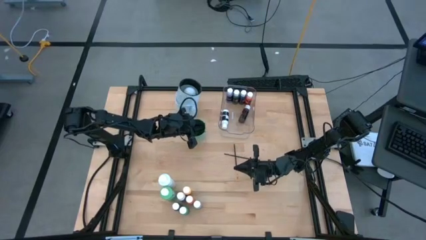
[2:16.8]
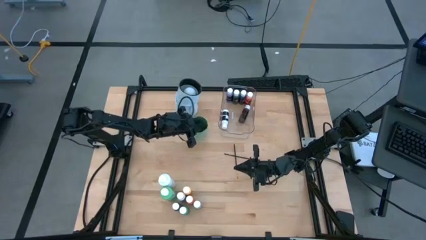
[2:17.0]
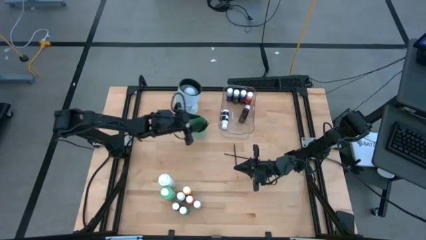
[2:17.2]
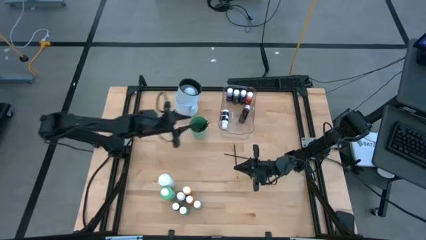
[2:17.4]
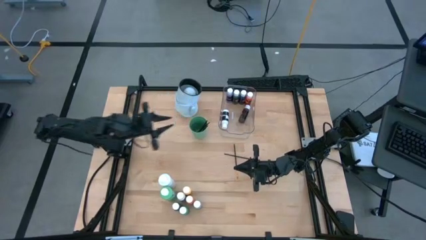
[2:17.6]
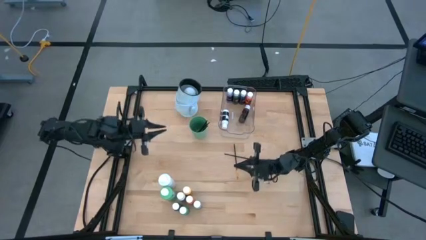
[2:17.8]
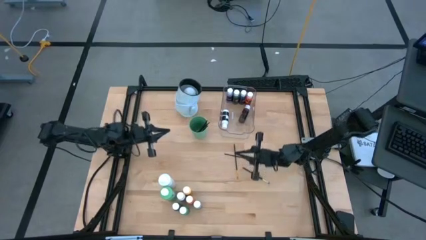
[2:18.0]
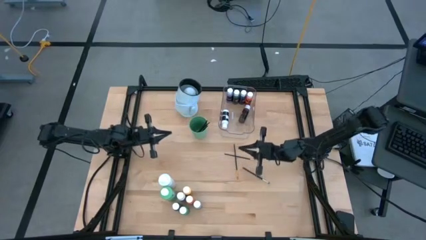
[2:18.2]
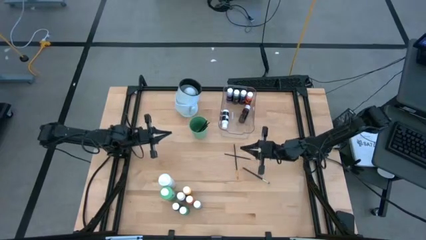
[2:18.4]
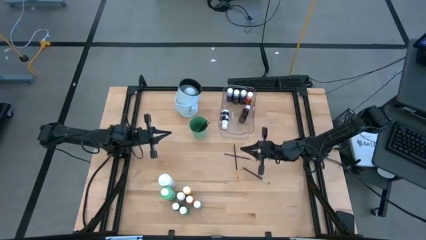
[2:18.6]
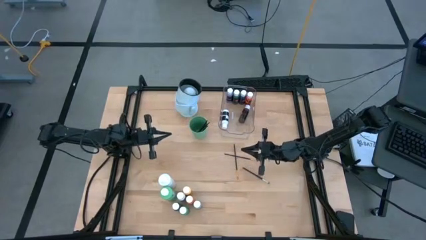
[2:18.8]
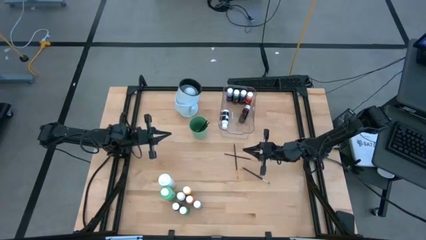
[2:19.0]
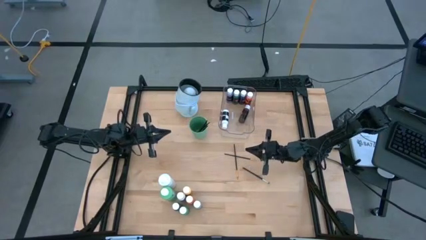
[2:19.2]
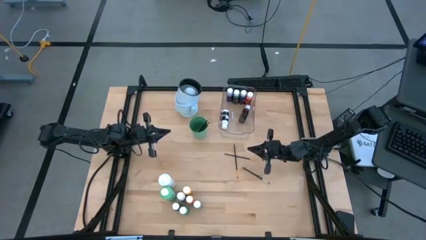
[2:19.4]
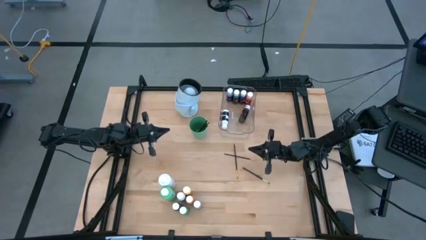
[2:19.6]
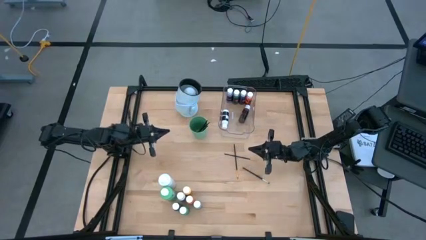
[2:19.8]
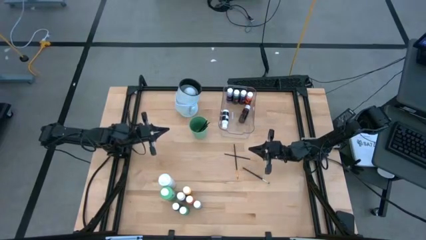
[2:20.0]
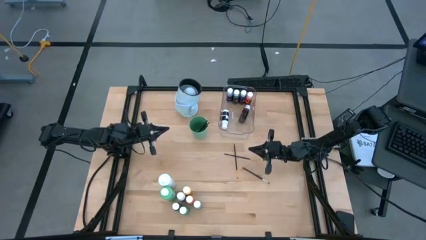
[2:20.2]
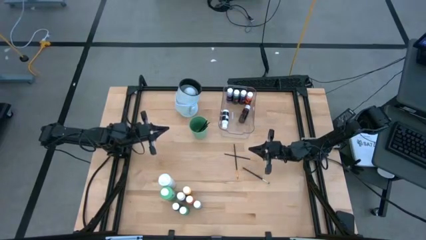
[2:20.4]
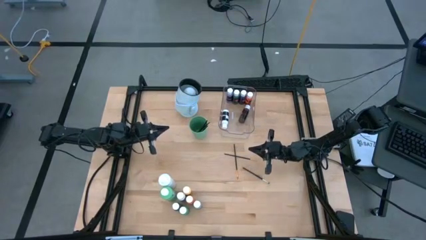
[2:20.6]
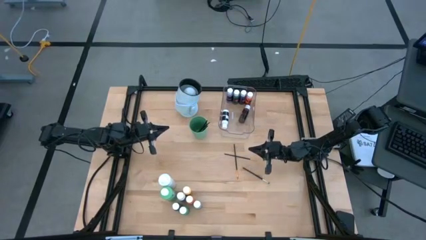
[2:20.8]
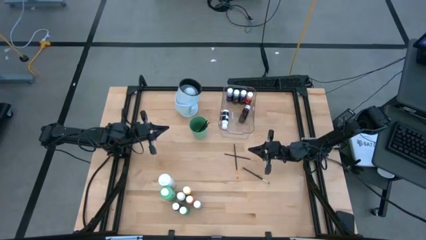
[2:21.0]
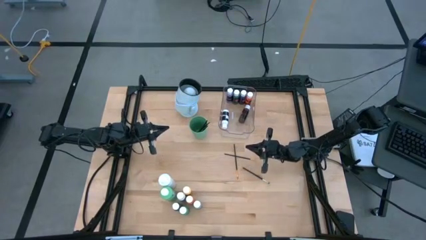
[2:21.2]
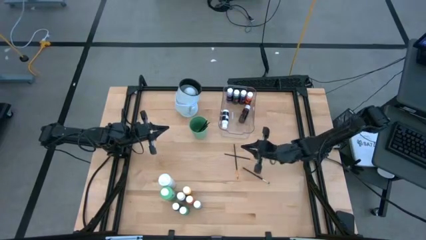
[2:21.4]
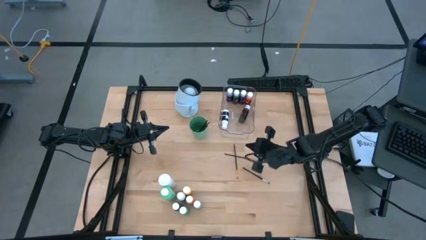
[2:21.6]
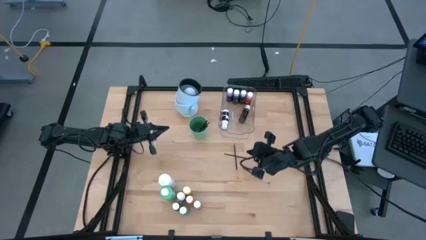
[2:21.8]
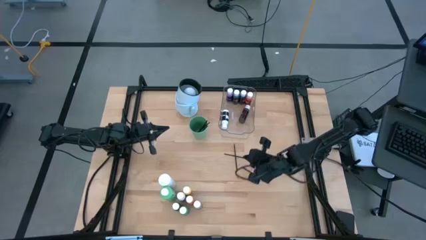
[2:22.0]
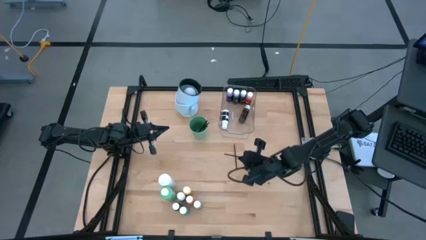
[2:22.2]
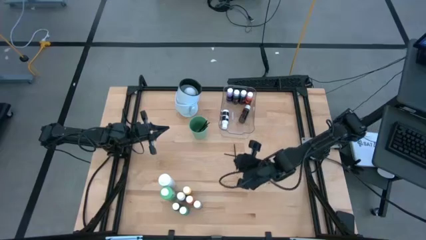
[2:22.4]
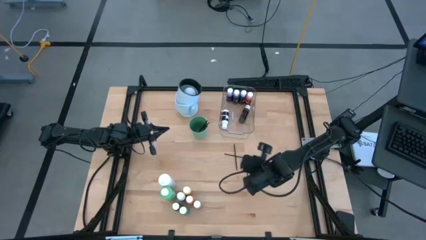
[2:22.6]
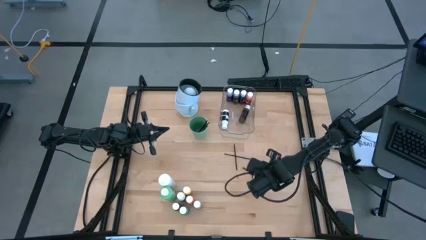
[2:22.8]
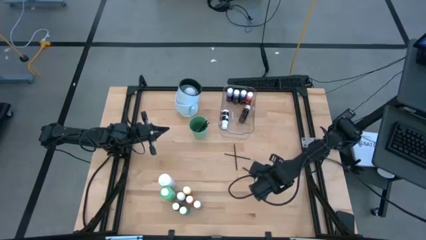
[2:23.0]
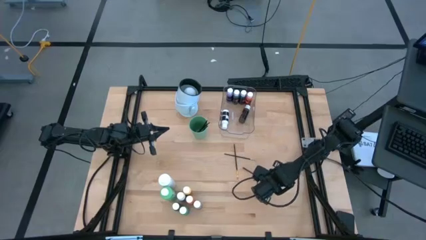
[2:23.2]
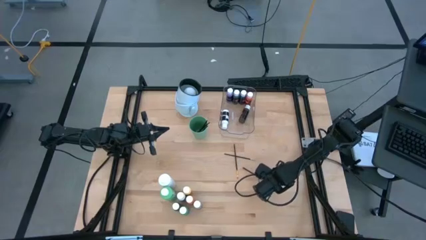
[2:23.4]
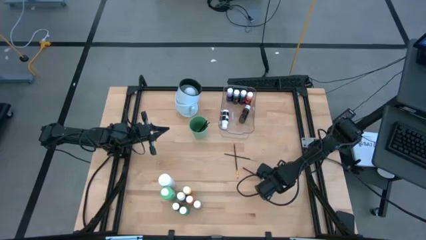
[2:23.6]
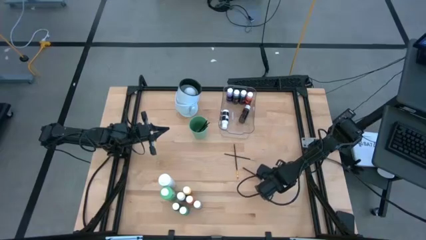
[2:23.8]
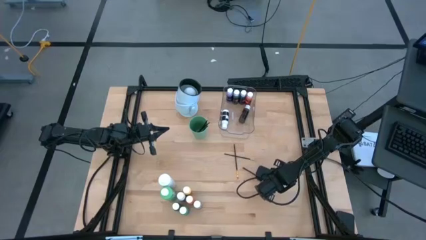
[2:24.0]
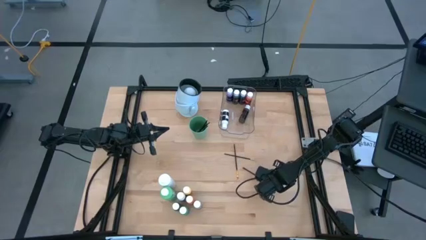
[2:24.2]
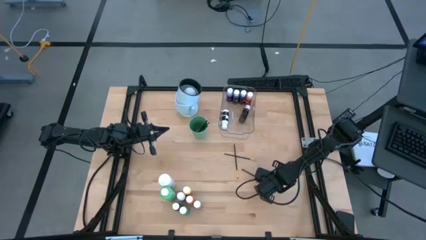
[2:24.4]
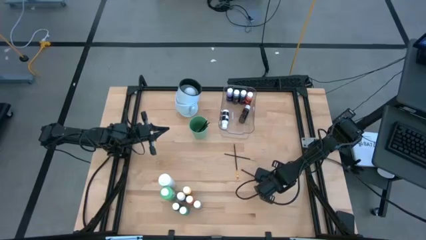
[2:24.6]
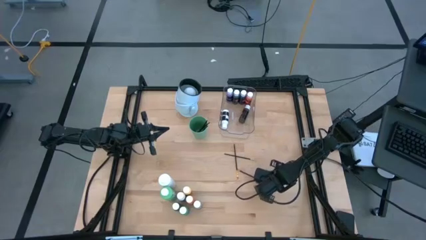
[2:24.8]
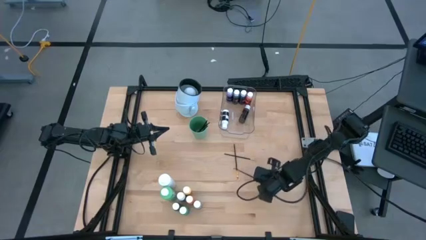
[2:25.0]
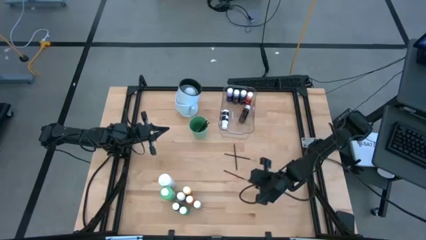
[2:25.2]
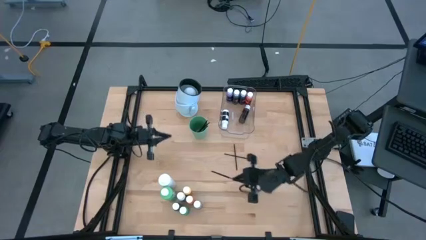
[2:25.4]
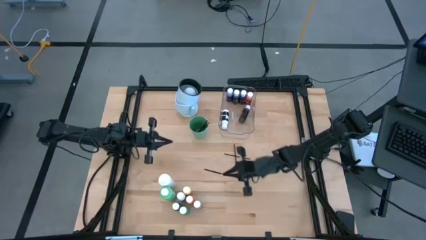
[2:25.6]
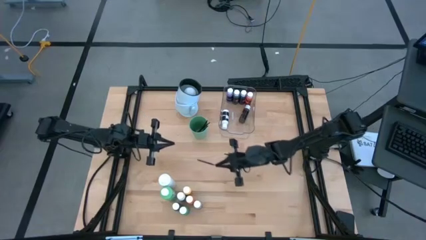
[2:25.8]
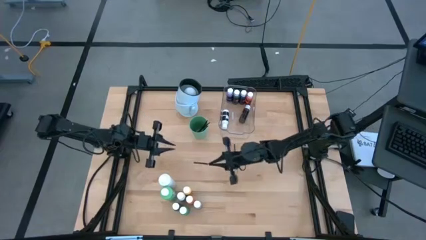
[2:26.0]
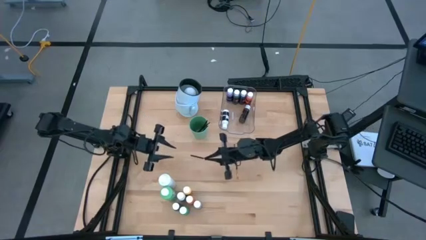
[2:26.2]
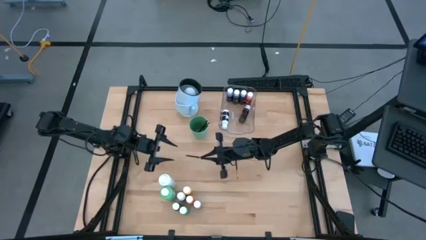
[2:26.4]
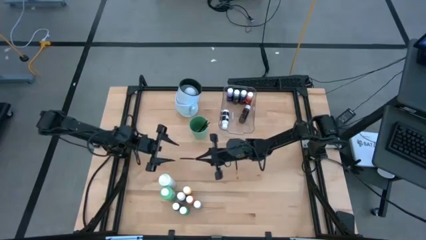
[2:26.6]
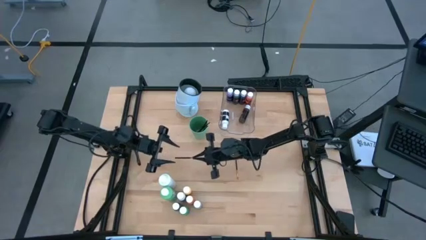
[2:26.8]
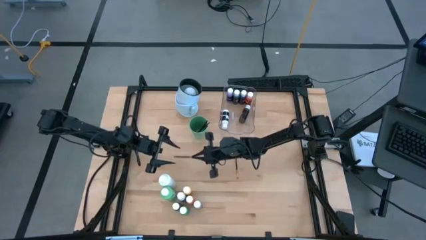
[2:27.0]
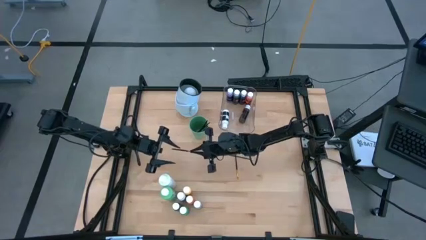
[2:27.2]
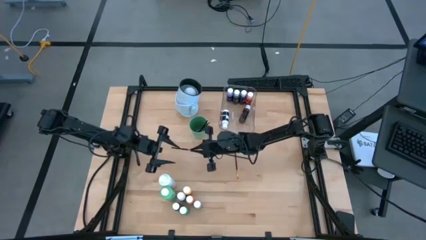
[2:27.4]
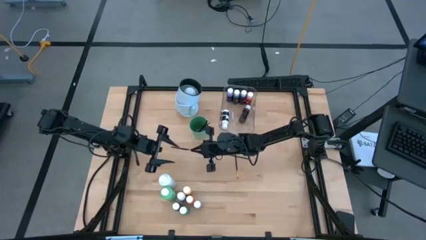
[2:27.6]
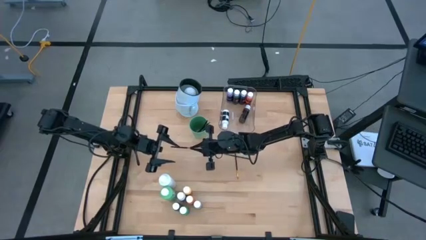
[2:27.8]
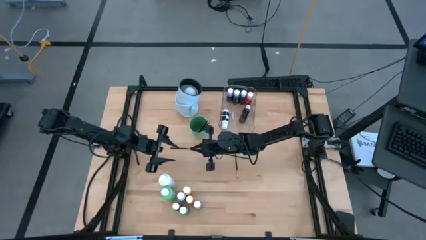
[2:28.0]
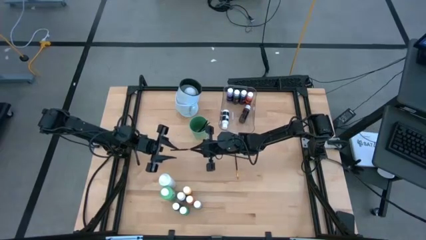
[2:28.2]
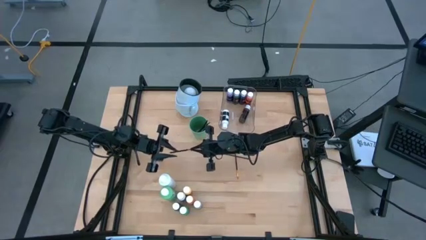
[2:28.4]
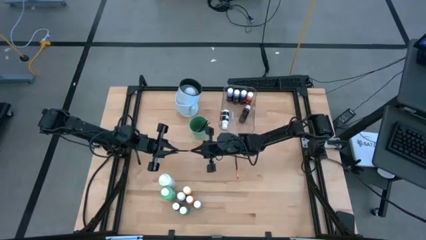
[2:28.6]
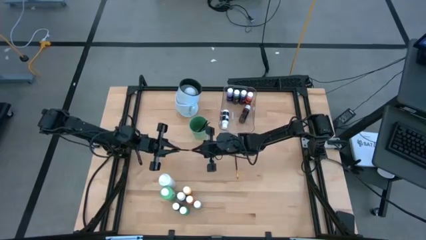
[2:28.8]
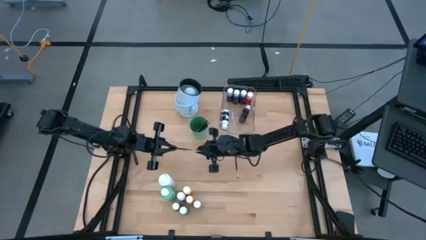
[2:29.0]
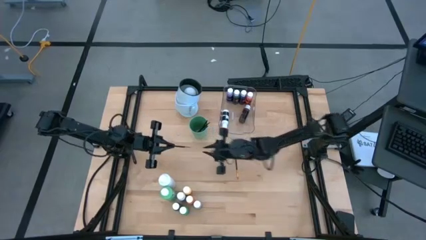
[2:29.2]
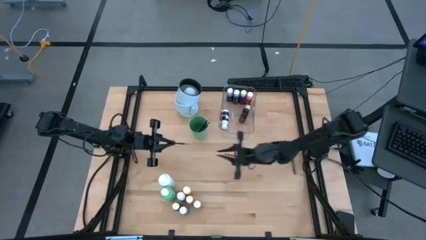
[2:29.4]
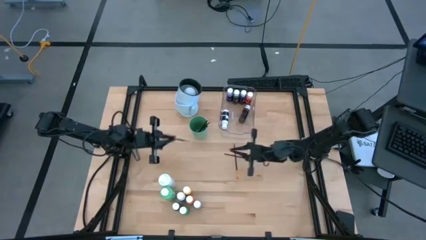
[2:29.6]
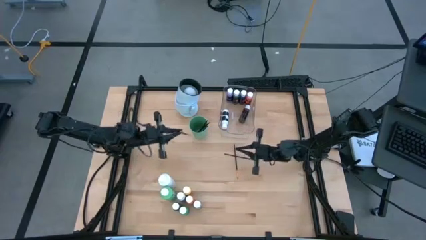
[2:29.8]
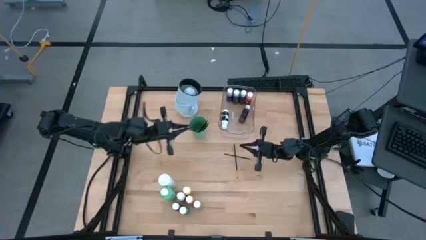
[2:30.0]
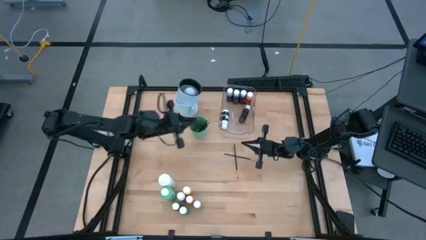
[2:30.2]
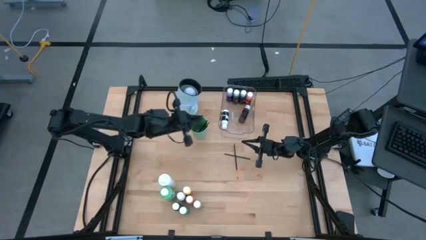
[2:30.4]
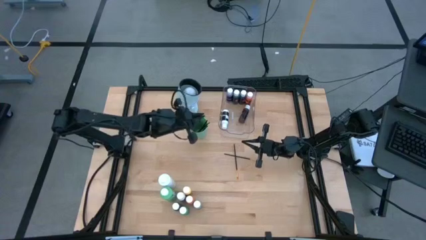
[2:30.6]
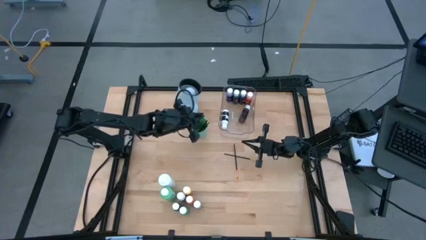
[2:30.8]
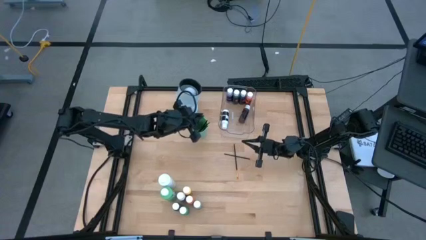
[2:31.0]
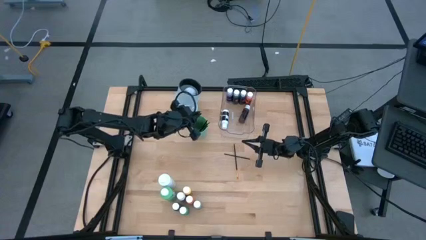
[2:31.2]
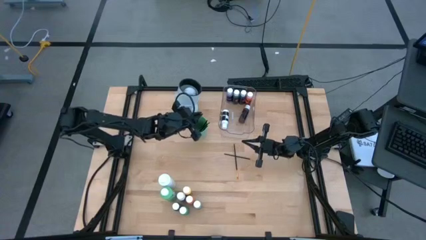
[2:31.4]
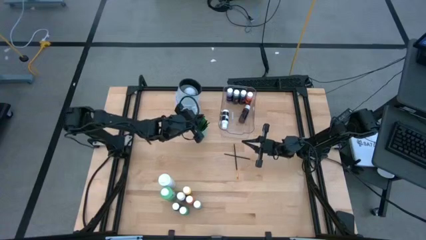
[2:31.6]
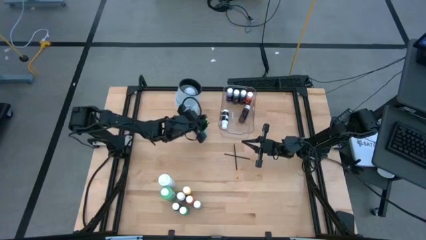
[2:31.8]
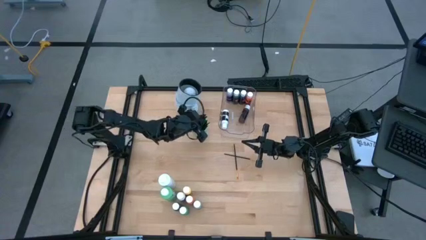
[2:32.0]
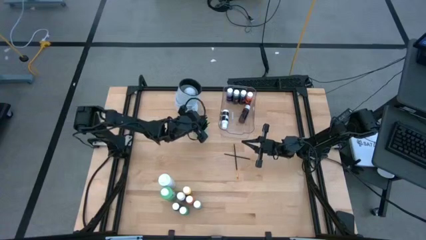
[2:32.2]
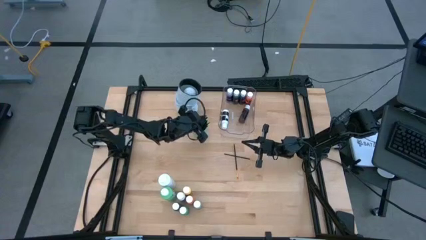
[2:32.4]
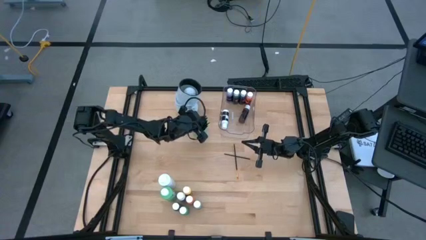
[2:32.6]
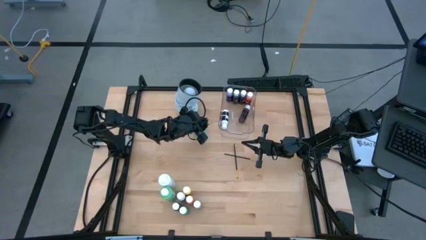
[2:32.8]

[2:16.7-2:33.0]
Task: Pick & Place Paint Supplies
Put the silver paintbrush into the green cup
